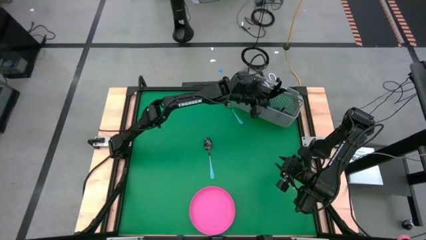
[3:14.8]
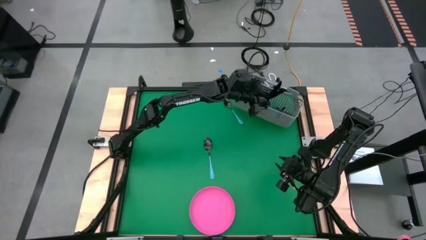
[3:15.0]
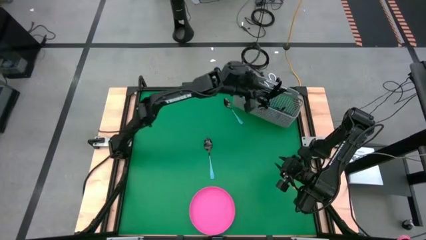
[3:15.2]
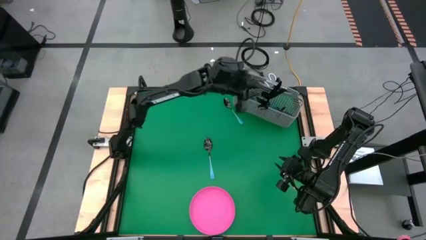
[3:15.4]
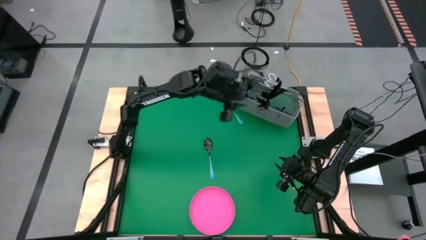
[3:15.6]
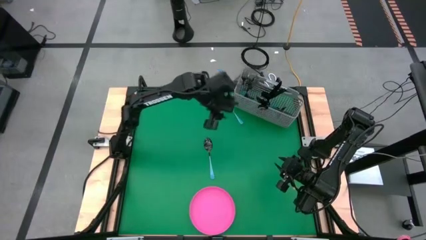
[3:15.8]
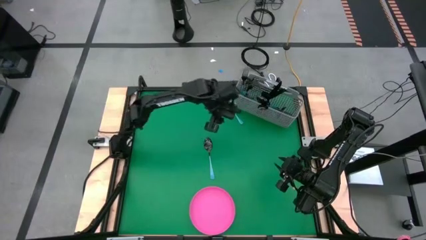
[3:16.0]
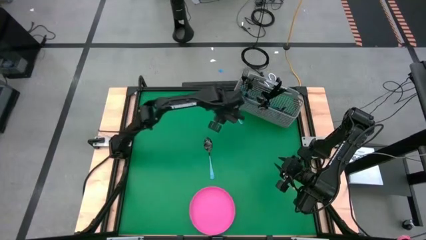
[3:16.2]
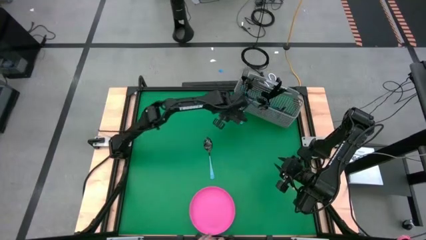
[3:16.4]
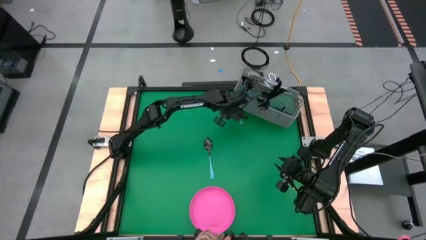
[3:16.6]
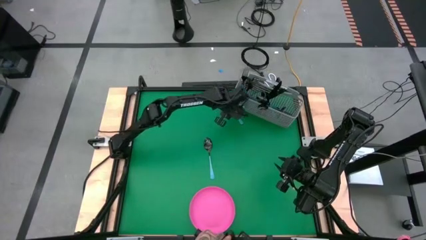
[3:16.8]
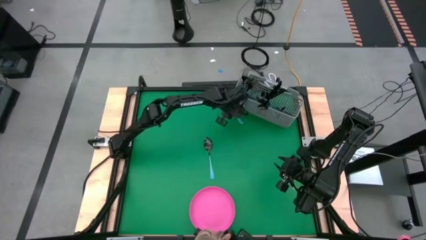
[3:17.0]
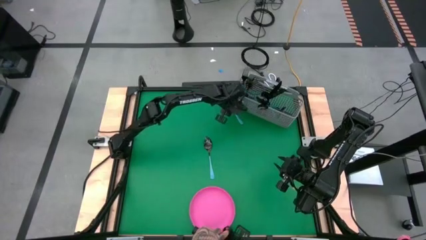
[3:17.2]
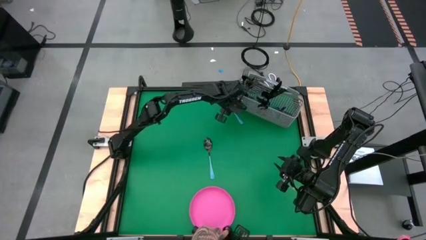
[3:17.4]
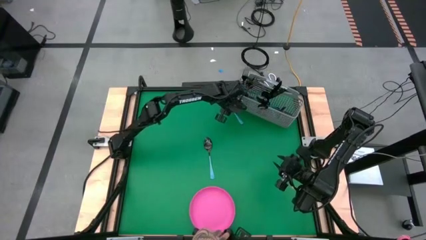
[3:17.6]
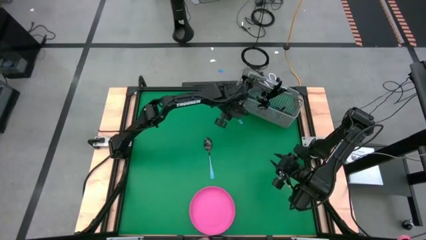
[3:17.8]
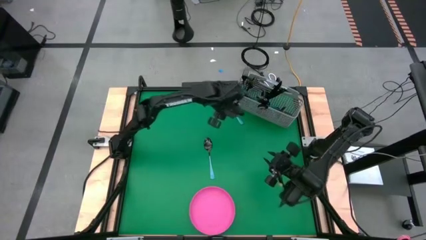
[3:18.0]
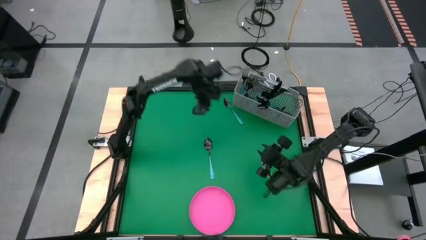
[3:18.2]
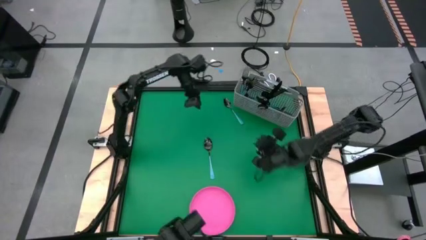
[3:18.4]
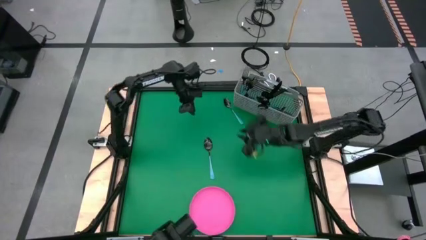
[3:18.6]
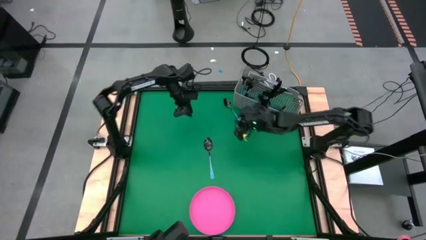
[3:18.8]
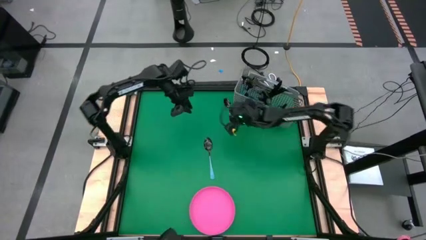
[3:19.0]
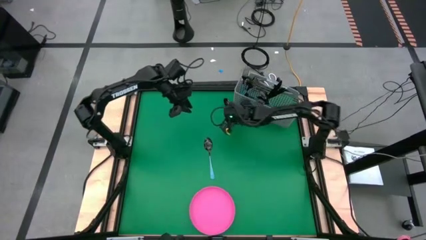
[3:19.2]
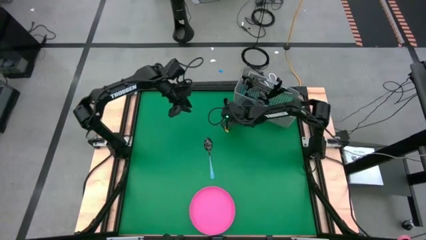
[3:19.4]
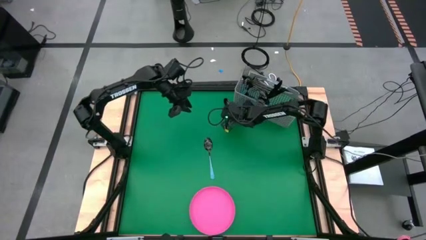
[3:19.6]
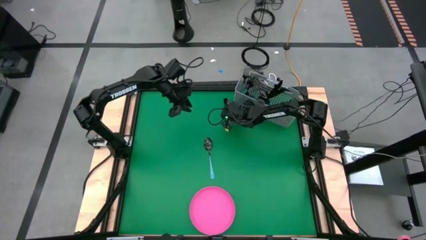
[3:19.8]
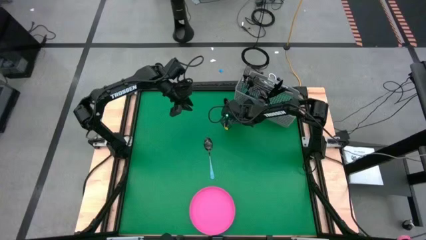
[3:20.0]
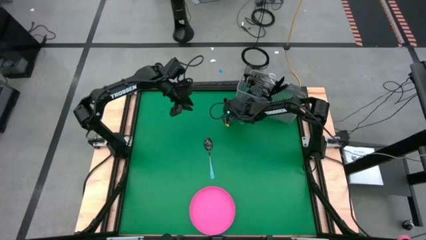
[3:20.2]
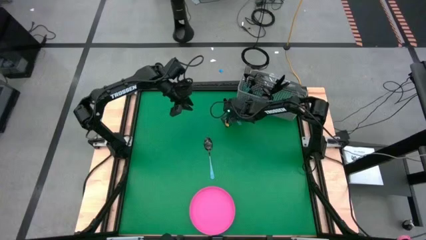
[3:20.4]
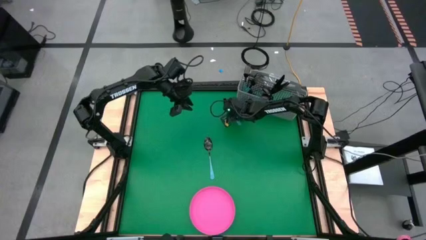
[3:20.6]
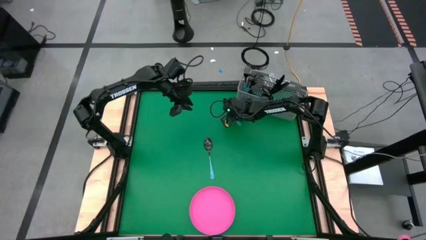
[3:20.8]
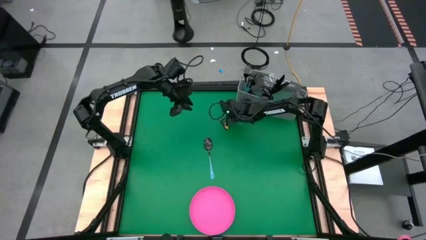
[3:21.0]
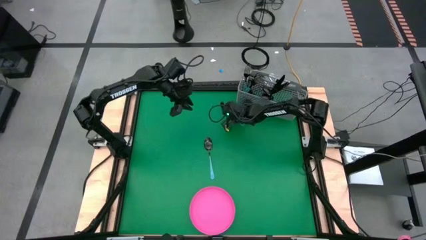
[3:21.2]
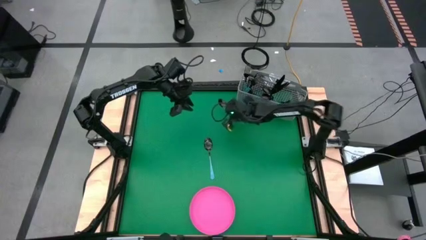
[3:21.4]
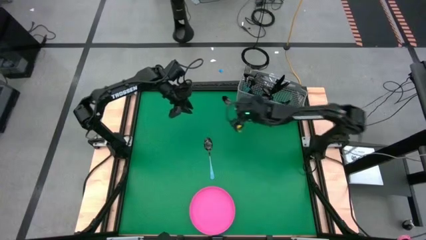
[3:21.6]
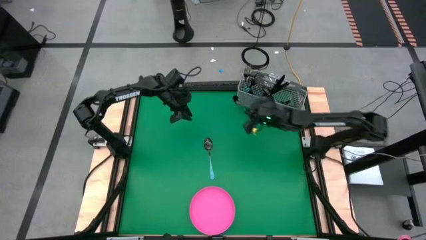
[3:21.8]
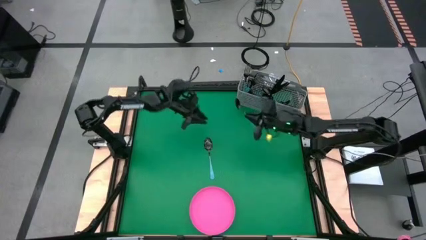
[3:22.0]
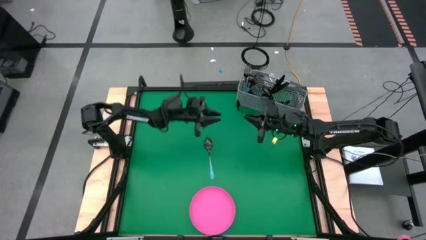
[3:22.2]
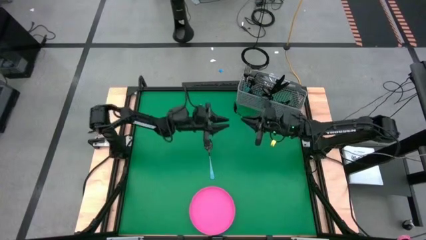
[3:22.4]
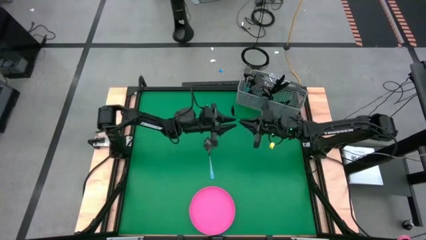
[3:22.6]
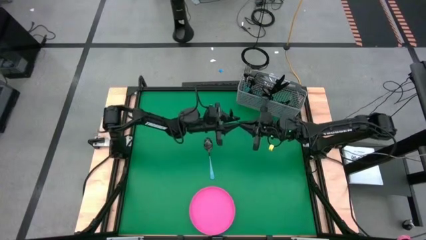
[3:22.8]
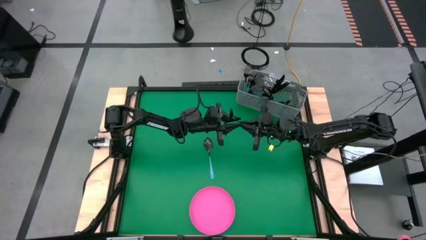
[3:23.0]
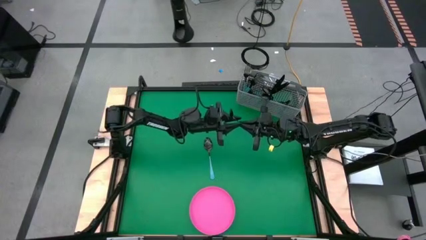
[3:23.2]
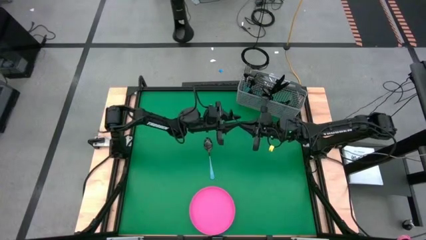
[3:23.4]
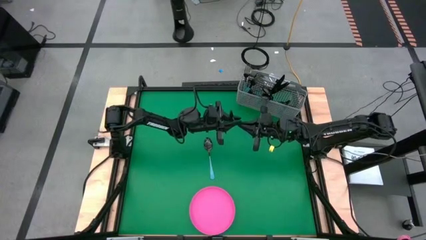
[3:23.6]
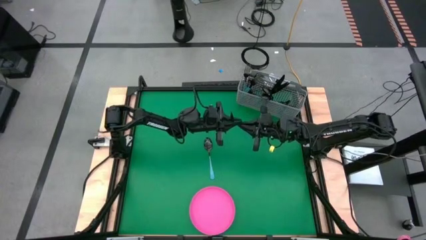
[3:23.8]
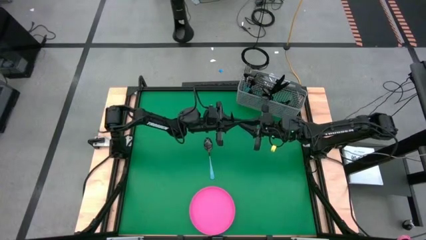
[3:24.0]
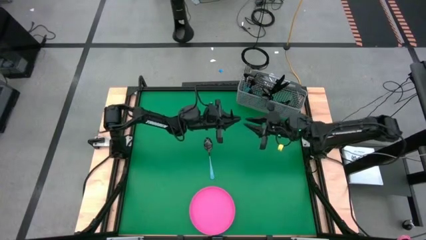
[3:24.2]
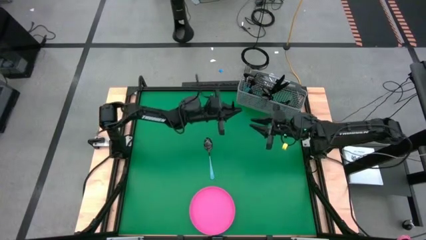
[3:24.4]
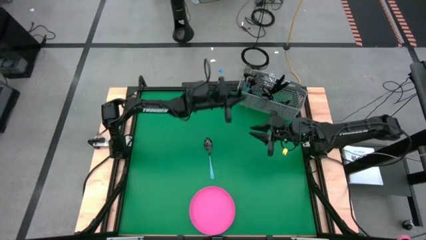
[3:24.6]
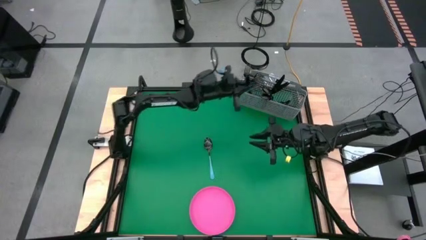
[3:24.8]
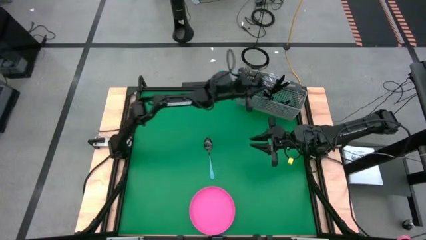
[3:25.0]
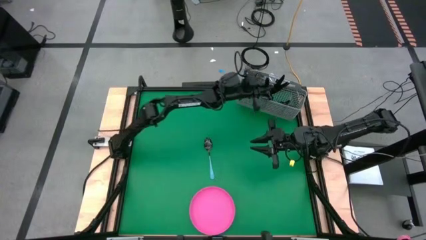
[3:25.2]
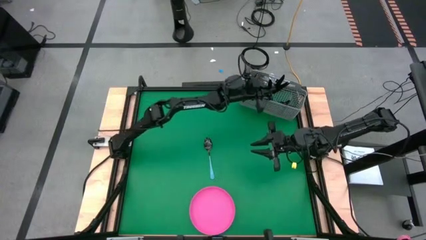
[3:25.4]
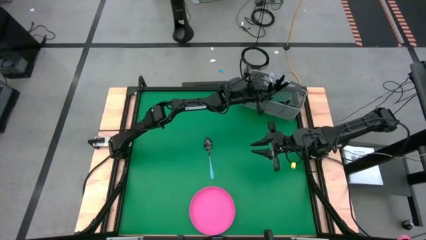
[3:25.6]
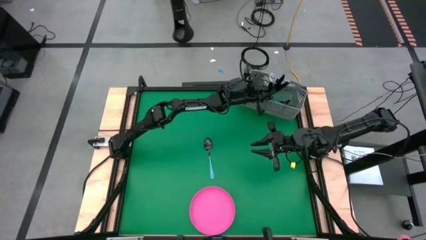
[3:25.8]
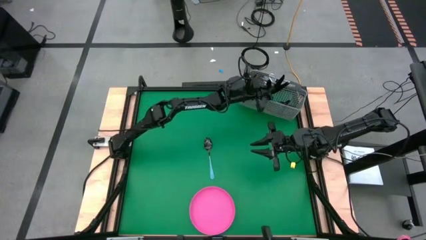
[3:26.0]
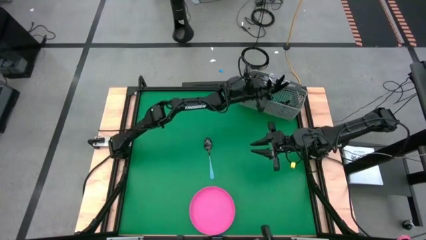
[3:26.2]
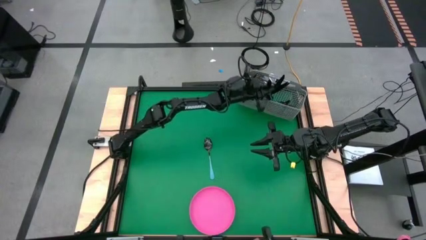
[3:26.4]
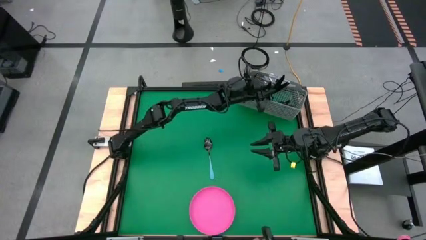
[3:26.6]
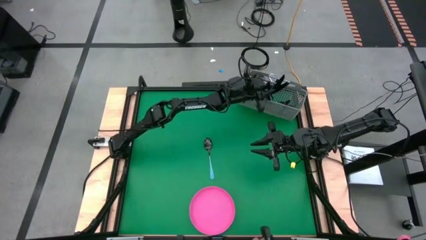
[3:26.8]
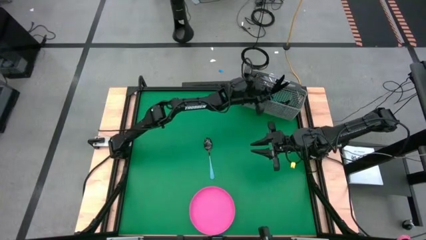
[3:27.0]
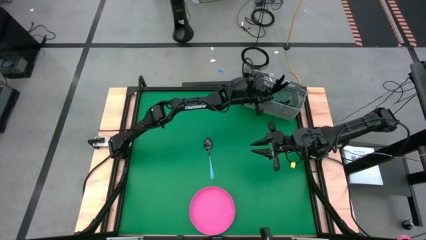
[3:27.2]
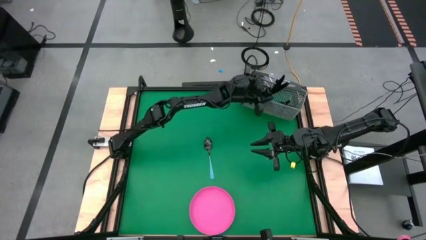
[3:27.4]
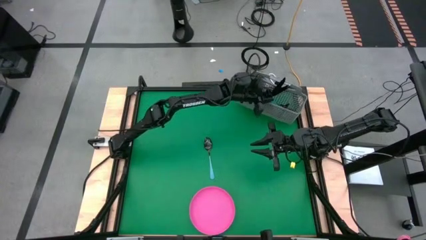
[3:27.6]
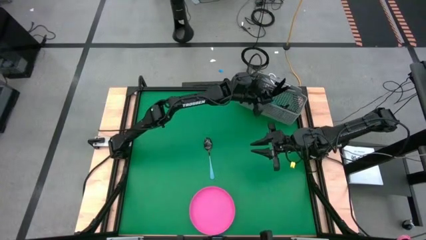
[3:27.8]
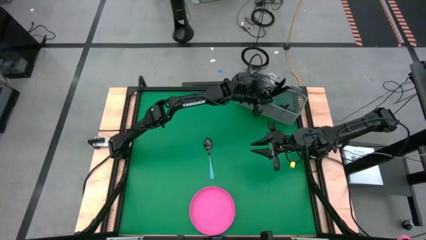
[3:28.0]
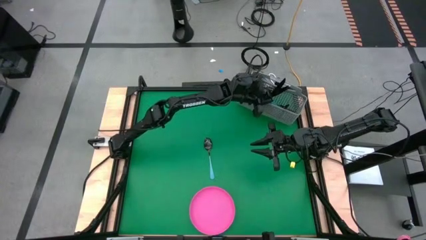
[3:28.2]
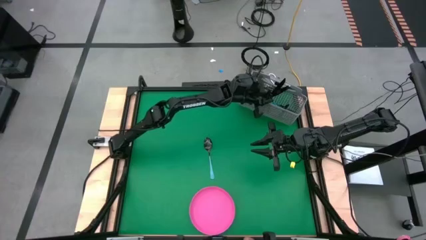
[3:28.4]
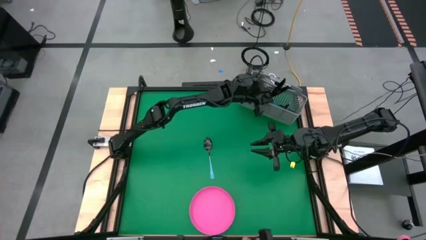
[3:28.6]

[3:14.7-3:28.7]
Task: Sort silverware
Put the blue spoon into the utensil holder

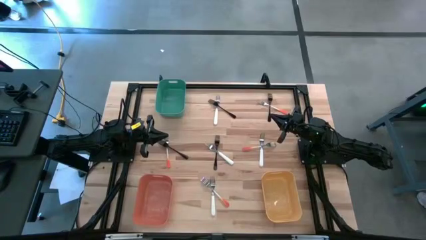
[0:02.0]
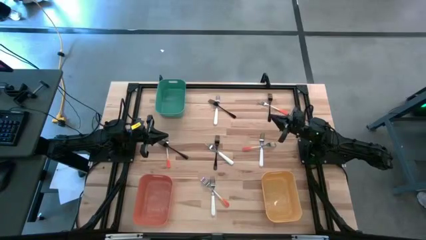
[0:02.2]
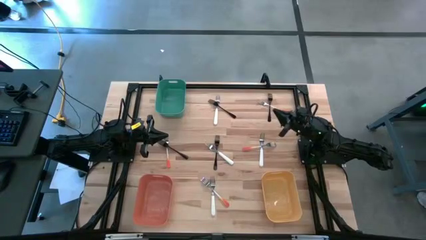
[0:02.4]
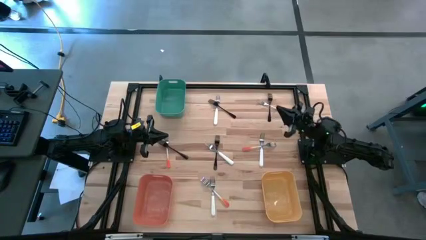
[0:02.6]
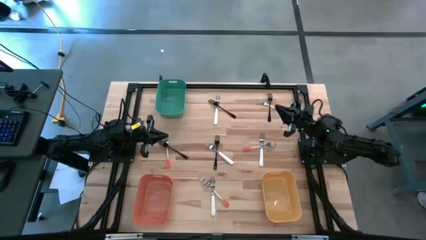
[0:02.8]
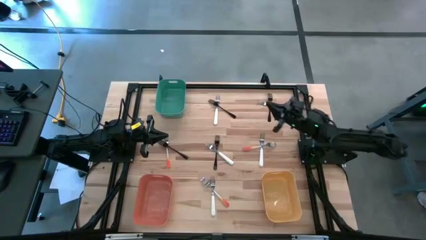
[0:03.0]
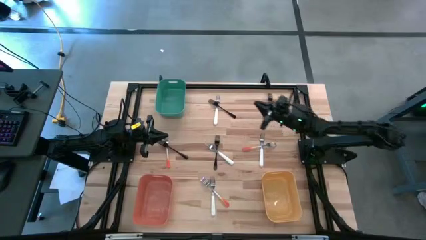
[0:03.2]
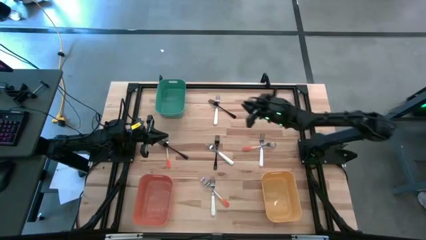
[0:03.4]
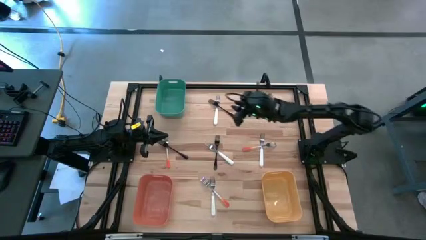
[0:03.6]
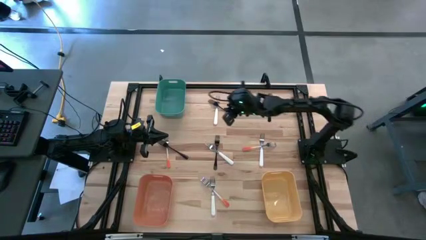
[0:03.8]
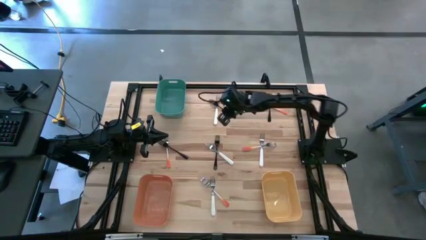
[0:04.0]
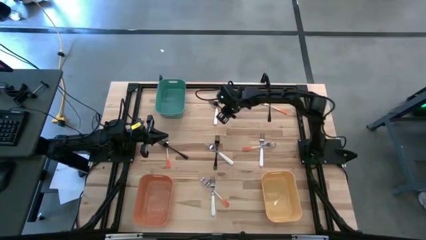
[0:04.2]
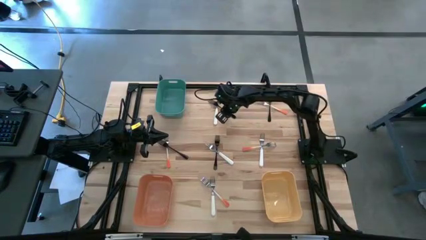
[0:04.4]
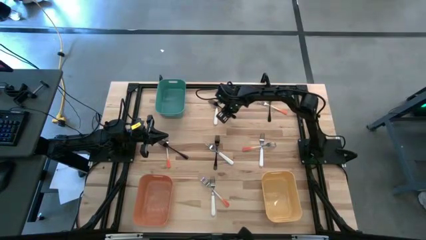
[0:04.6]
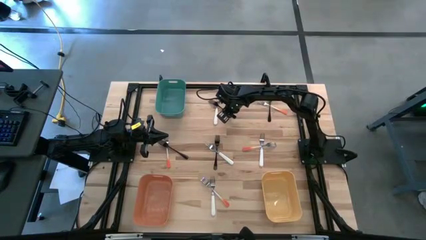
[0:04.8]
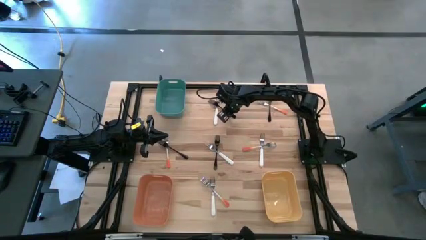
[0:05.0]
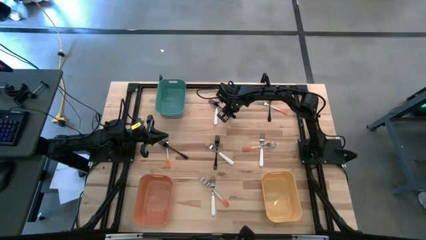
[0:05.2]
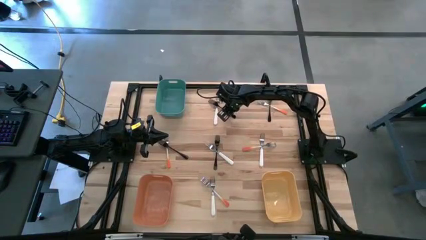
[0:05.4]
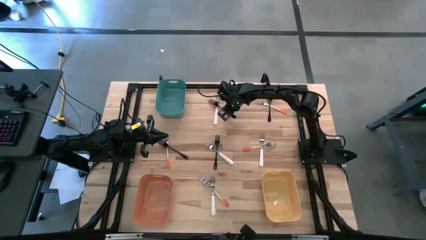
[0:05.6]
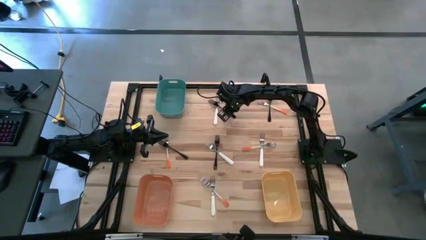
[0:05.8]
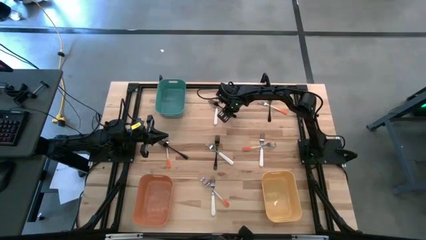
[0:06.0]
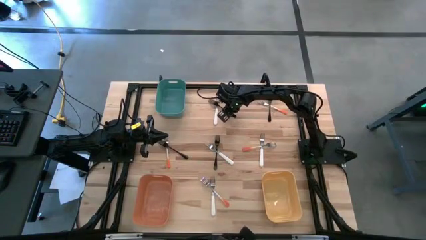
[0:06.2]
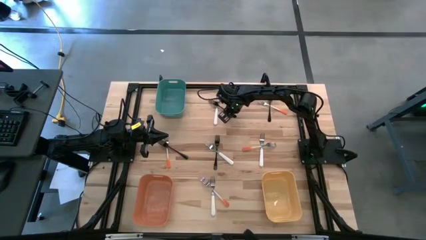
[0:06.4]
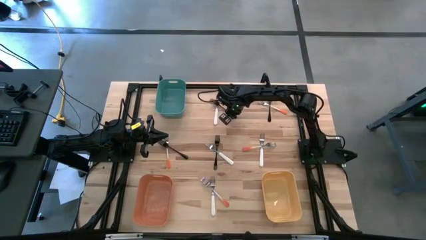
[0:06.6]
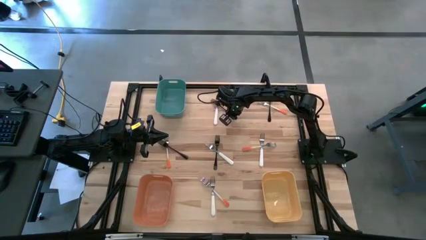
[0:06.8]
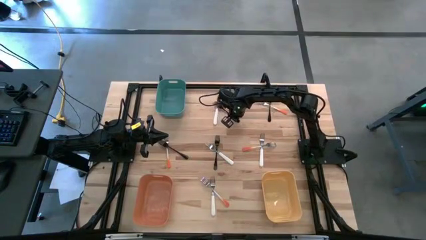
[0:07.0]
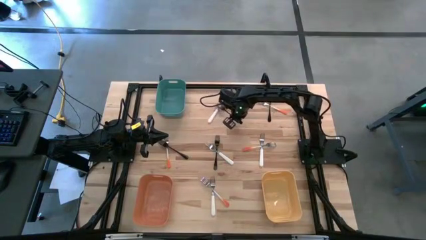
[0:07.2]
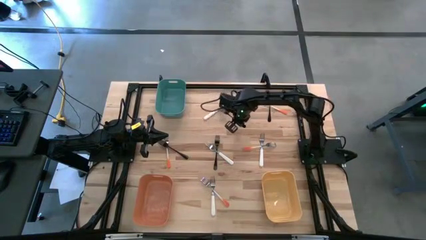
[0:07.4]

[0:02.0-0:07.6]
Task: Sort silverware by color (type)
Put the black fork into the yellow bin
